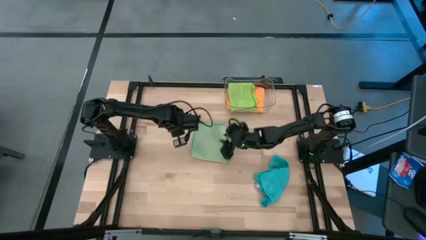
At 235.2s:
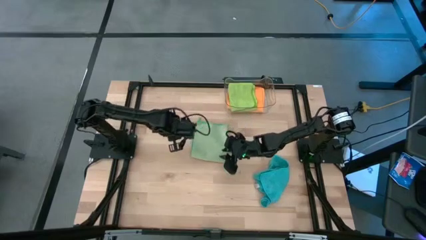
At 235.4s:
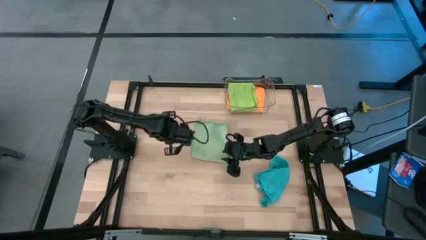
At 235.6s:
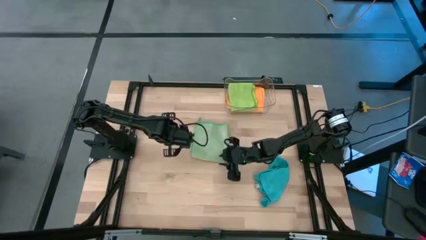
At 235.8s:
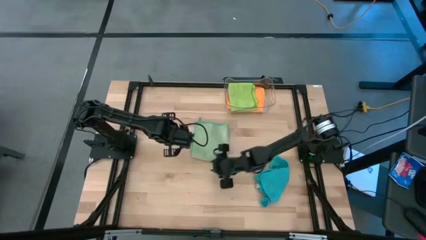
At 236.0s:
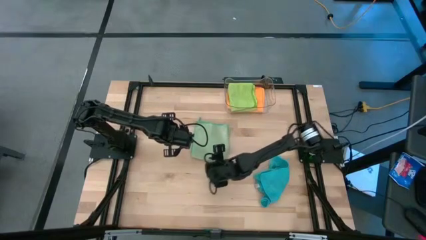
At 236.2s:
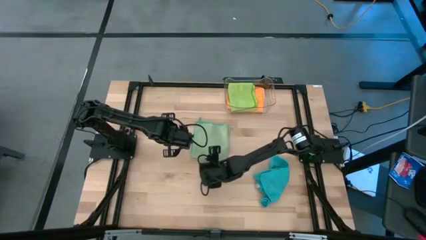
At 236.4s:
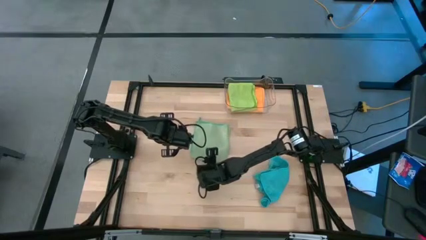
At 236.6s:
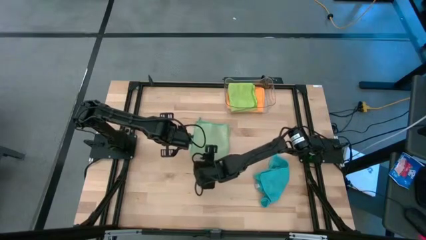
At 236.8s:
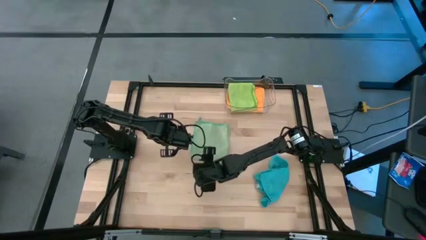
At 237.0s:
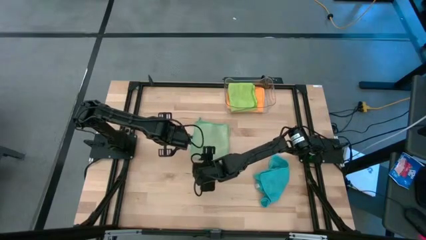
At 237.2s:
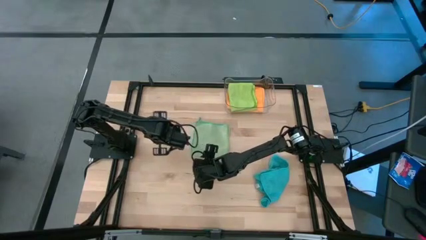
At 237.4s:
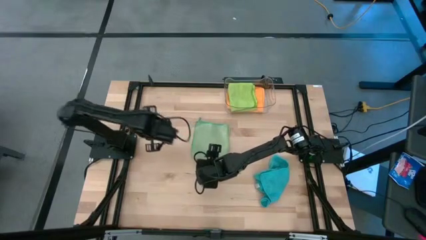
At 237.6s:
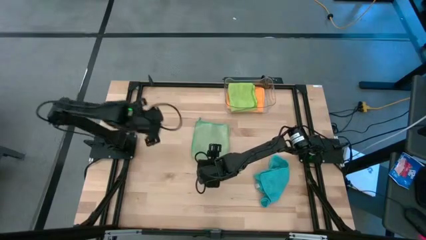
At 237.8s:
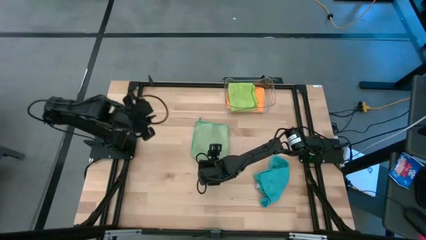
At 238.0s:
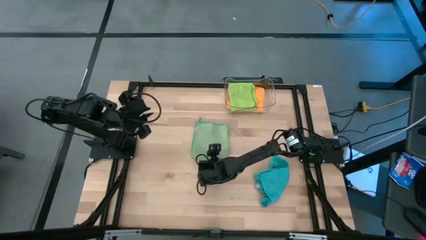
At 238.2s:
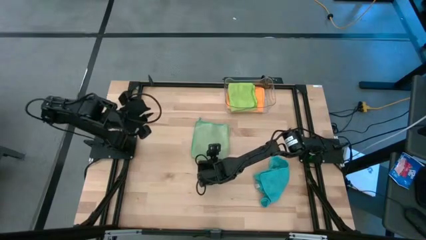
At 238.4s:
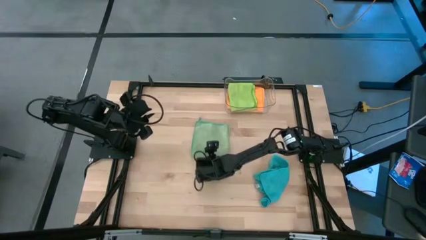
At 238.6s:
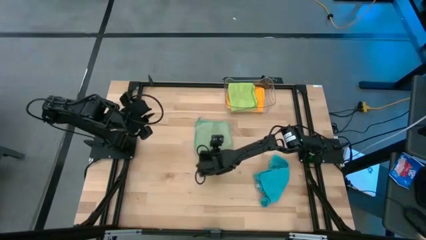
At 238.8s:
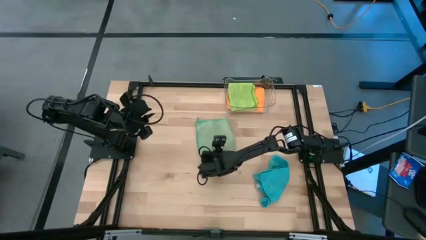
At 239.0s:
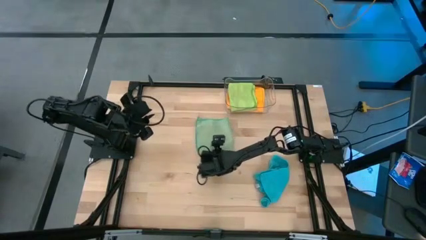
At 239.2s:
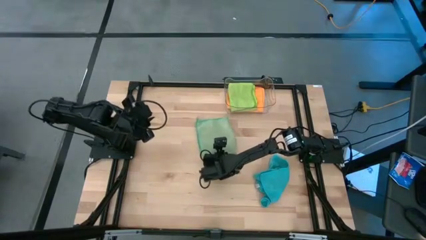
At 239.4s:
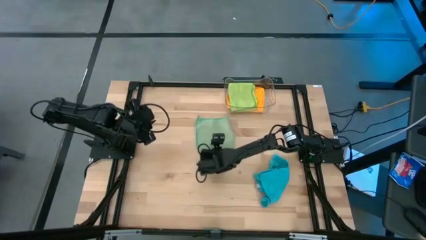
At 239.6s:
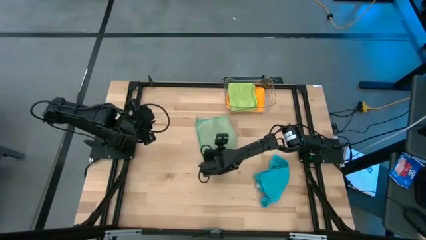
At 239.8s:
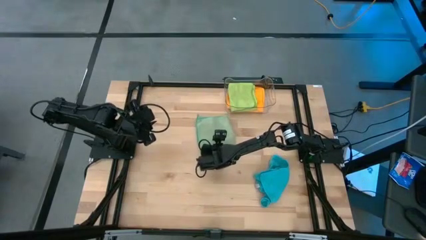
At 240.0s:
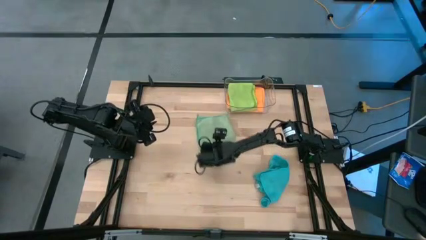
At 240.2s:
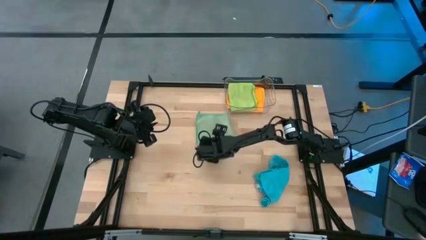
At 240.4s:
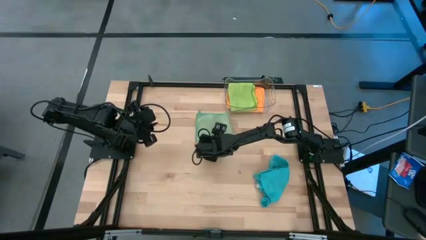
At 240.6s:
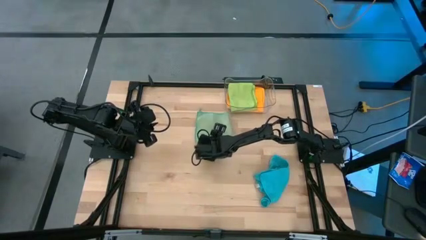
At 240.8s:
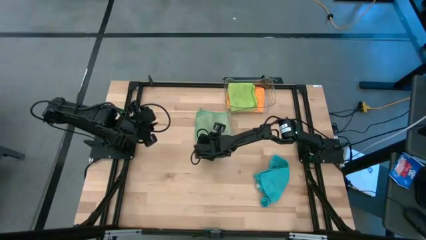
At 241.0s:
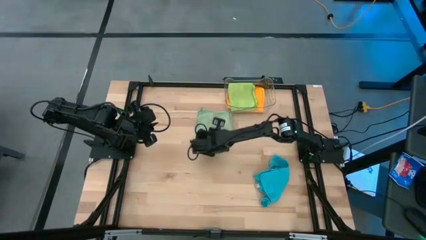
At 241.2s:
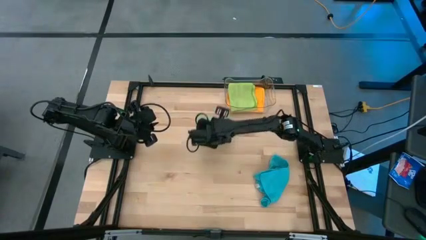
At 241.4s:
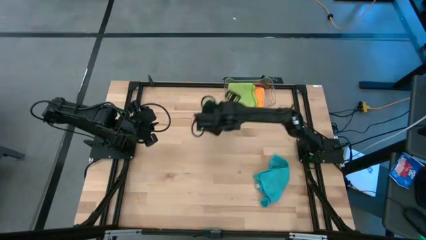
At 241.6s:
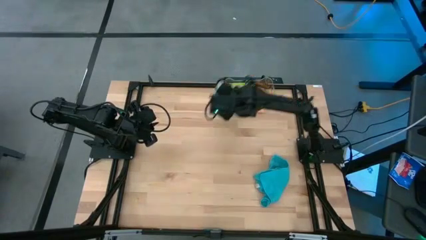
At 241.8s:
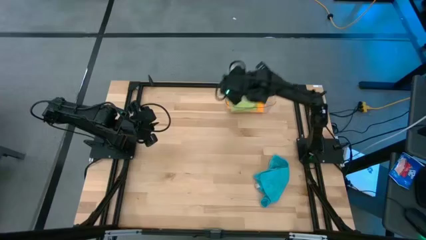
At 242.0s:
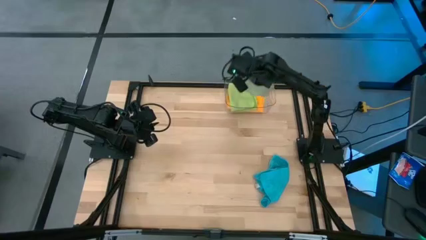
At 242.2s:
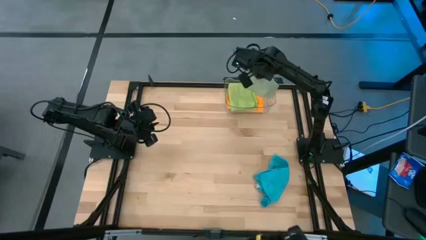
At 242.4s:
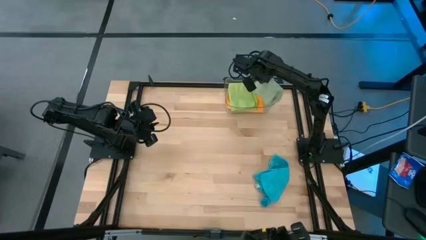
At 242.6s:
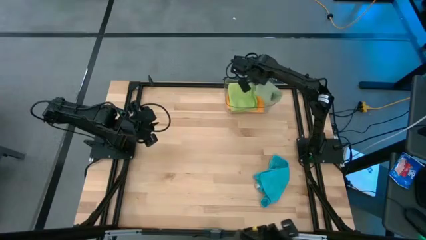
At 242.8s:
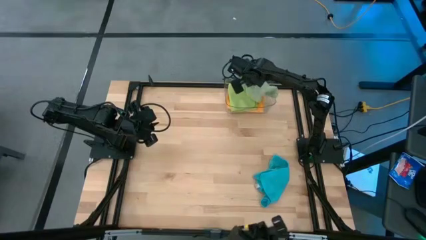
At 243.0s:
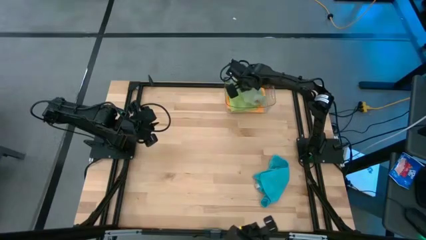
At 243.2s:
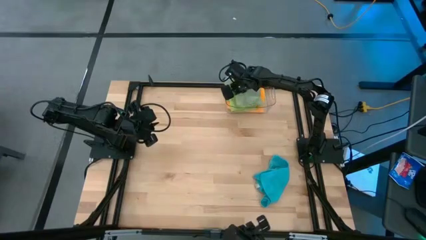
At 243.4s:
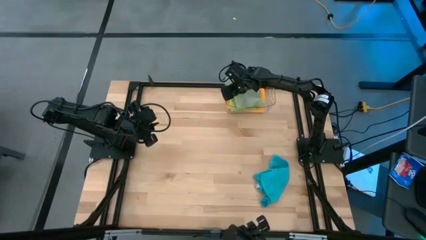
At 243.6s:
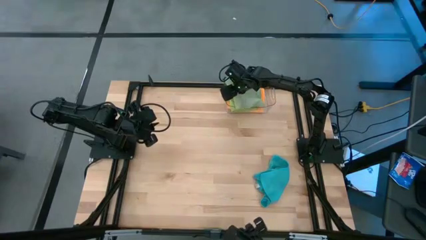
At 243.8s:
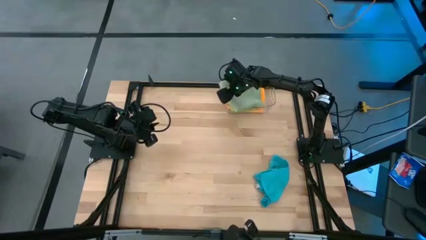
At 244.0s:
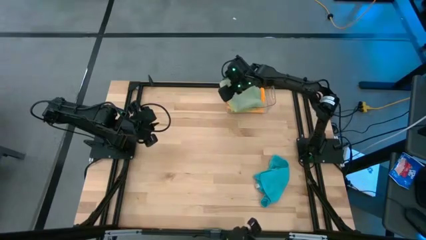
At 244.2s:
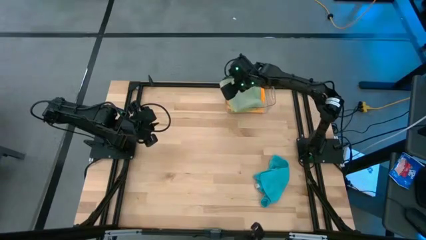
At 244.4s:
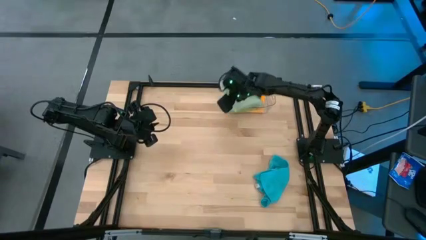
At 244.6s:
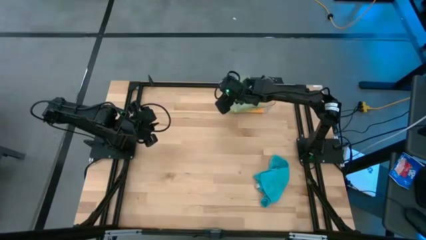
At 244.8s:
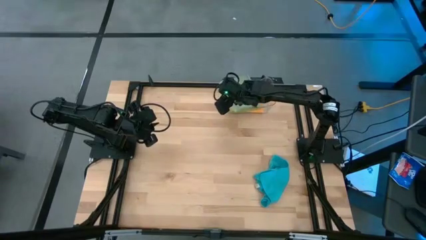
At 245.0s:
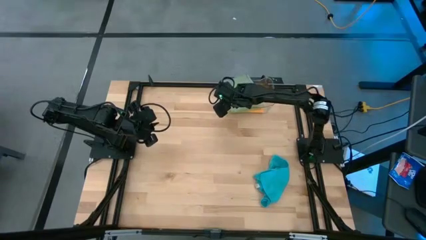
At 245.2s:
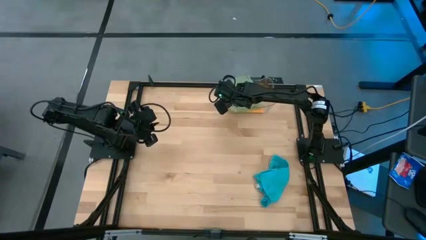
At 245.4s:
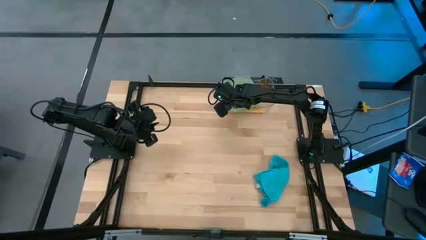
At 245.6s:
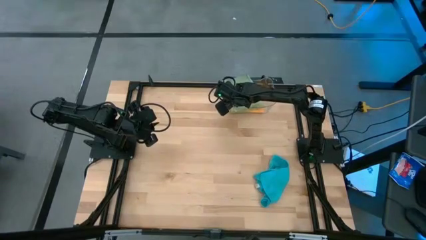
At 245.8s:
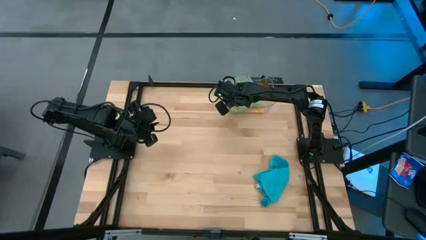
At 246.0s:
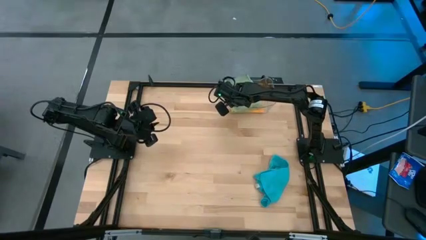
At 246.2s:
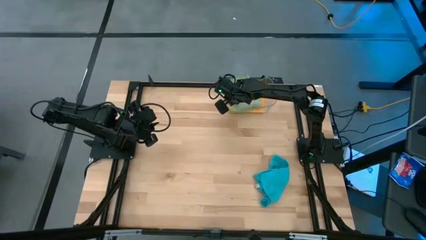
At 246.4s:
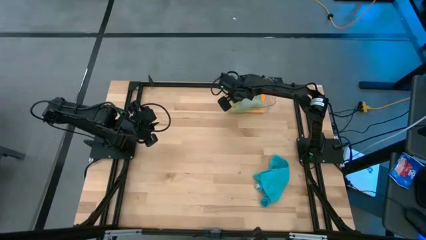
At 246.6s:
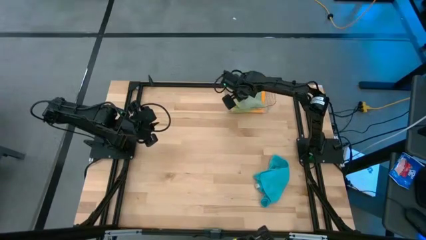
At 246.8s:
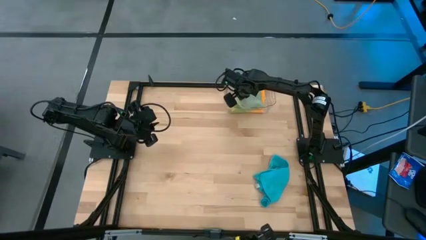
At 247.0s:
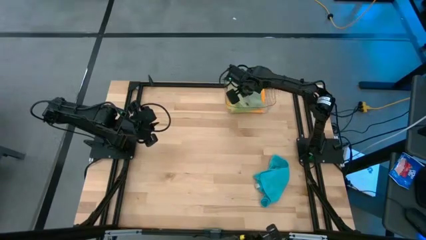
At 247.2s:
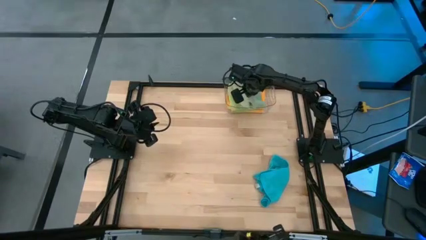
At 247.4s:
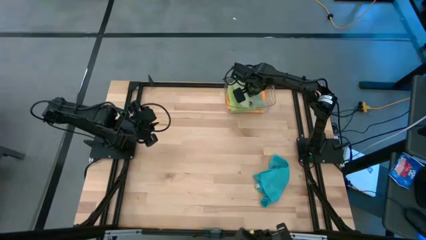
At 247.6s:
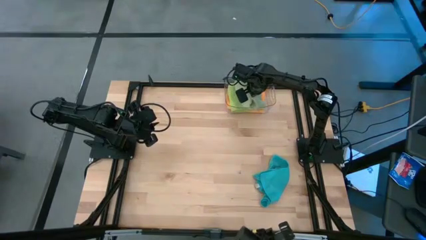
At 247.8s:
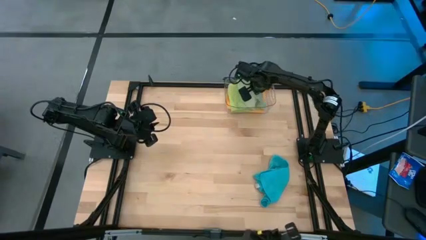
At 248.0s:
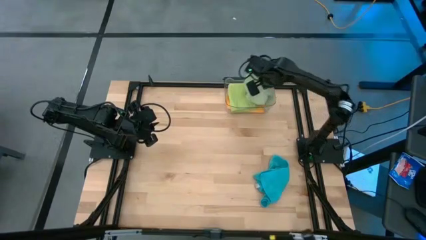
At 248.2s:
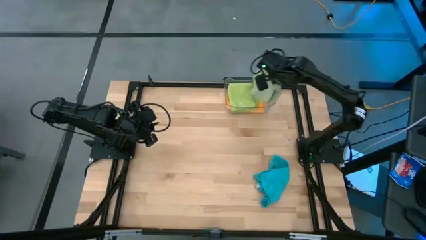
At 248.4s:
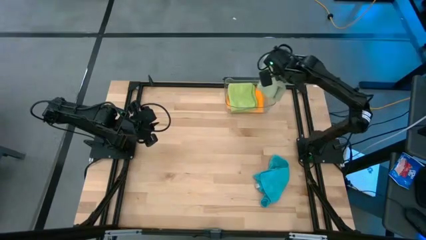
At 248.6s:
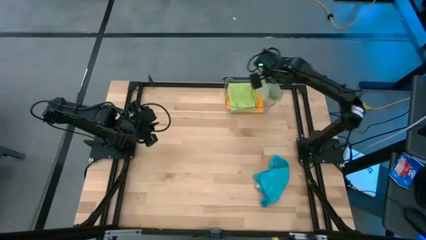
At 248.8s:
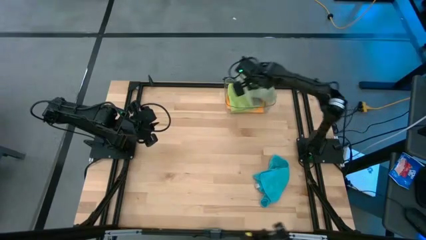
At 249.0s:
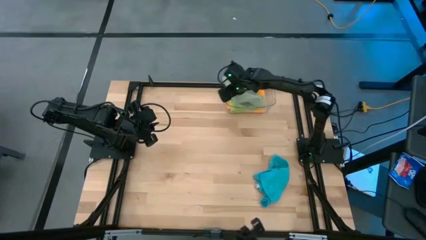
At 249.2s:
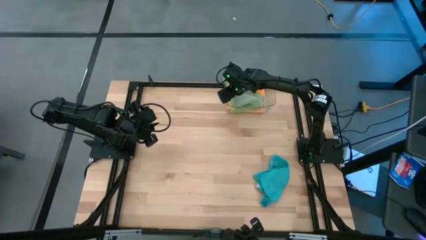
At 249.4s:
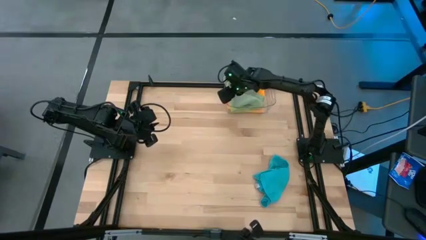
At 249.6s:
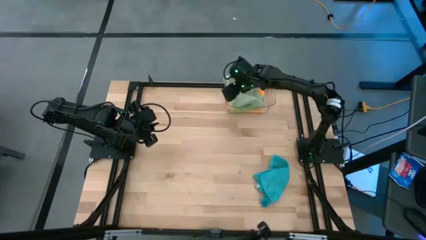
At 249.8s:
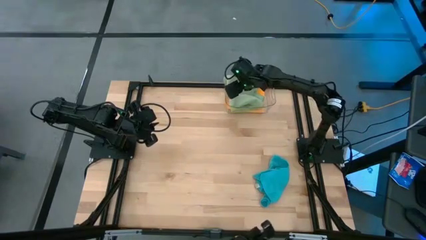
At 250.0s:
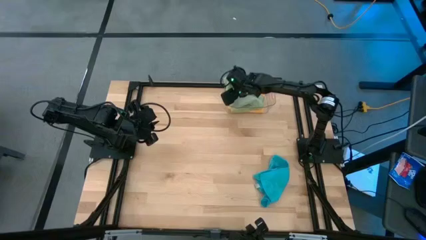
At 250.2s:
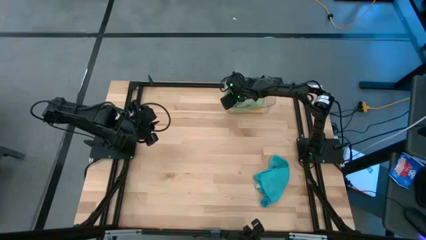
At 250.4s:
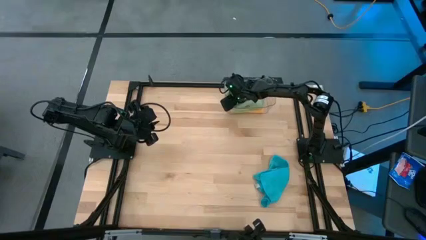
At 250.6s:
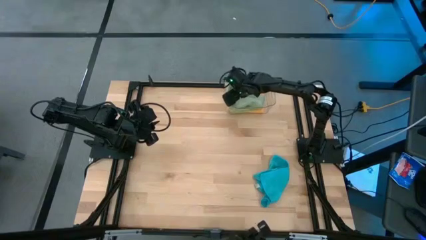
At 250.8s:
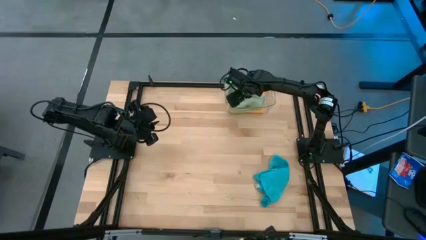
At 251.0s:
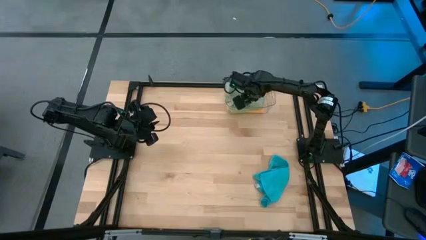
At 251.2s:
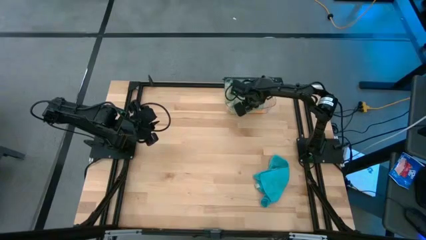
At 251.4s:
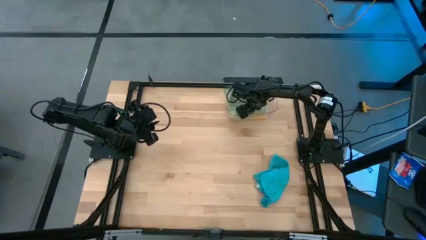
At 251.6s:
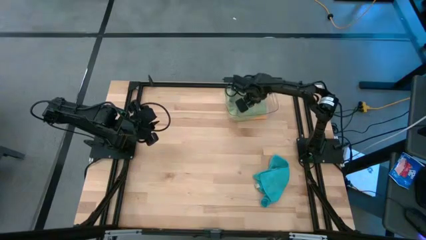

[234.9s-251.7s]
Task: Fold microfiber towels
Stack the green microfiber towel on top of the light green microfiber towel in the transparent bin

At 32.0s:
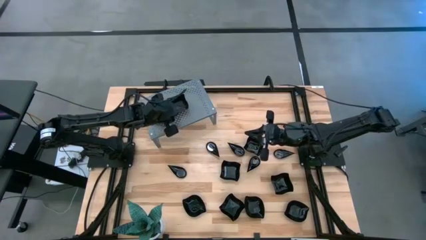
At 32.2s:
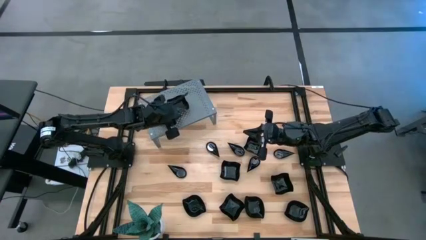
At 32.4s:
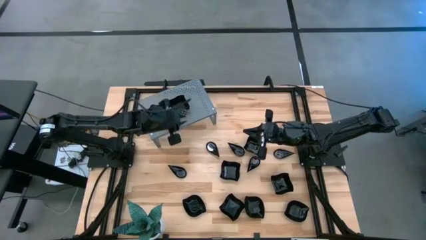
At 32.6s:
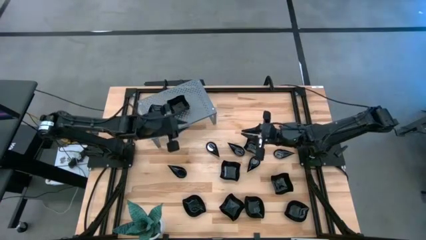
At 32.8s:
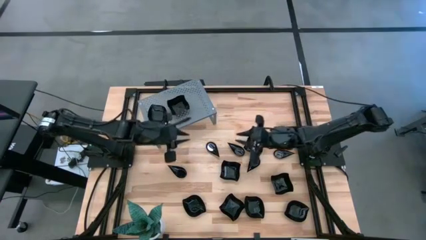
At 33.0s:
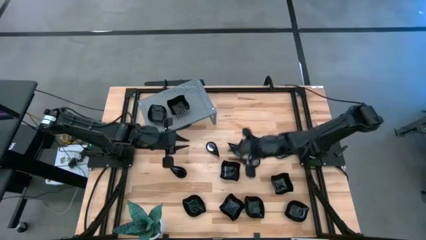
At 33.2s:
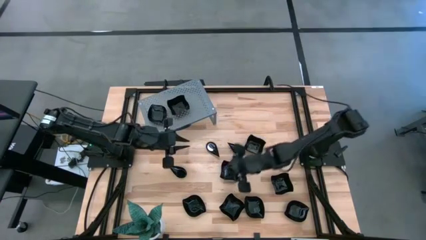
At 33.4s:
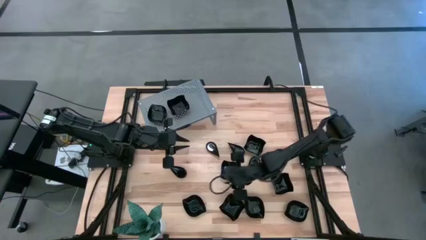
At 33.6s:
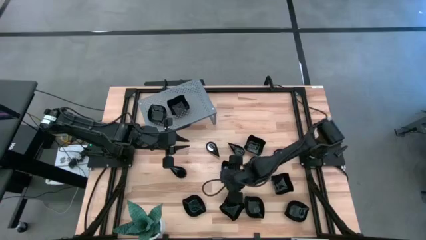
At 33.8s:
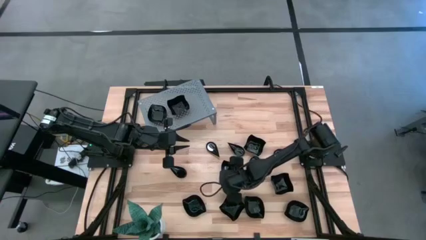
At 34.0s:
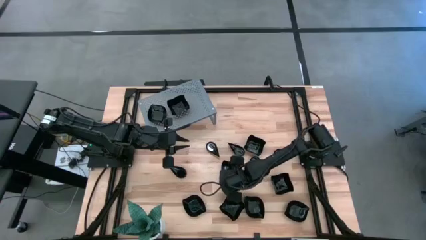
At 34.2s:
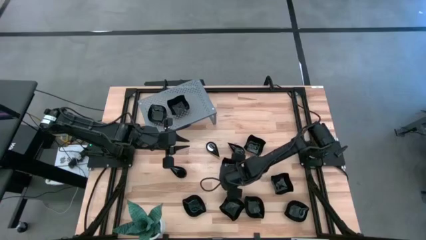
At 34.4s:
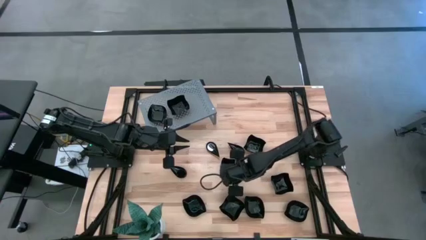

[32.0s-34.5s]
Task: Pick & Place Mini shaped plates
Stack the black distorted square plate on top of the black distorted square plate on the shelf
